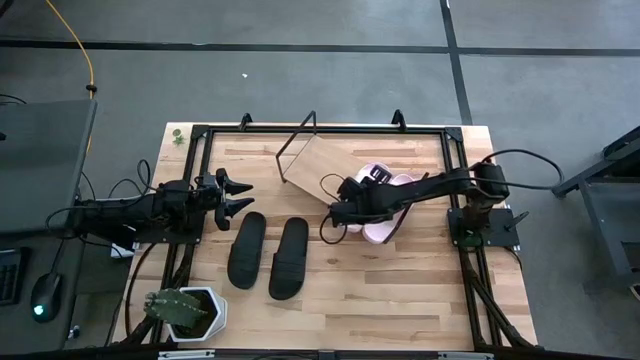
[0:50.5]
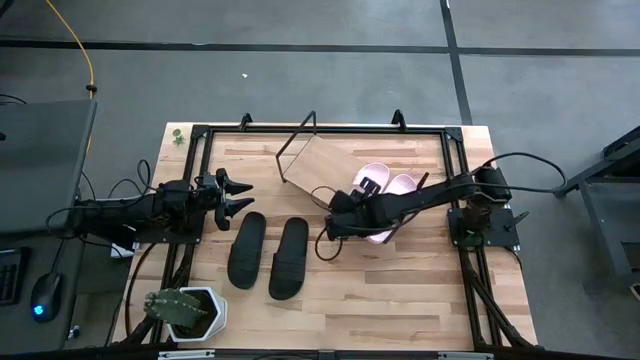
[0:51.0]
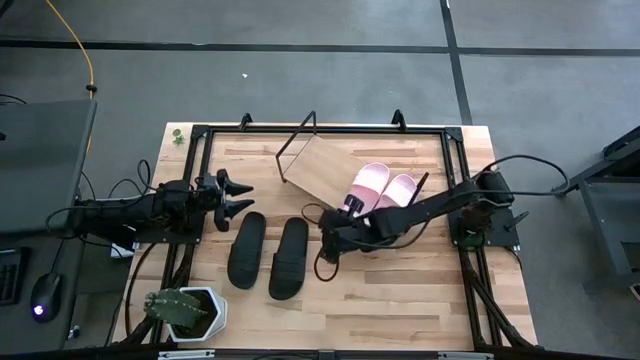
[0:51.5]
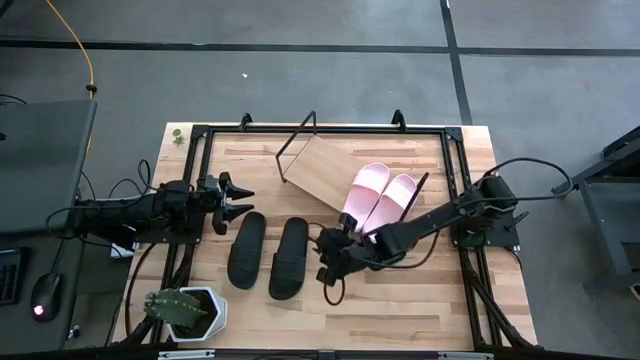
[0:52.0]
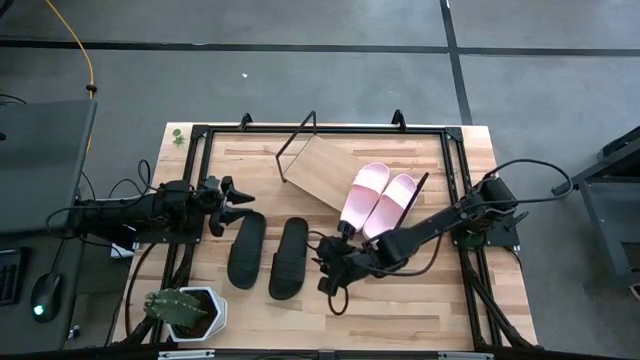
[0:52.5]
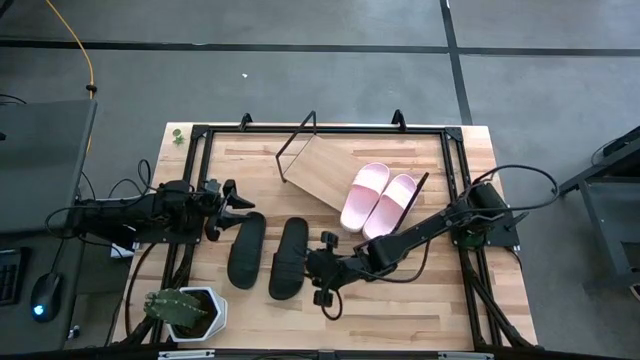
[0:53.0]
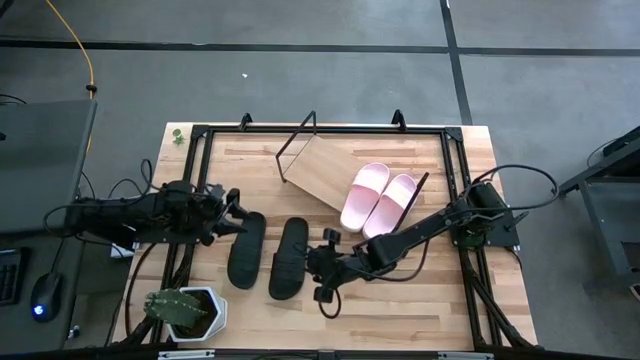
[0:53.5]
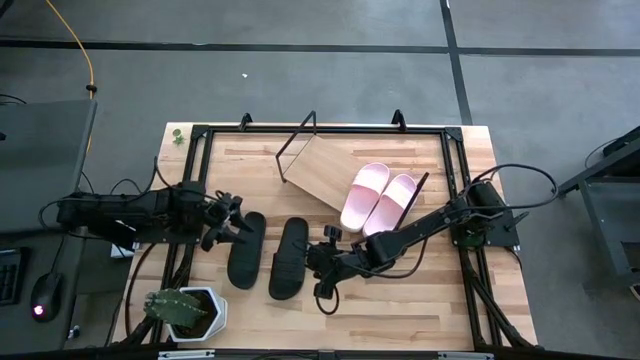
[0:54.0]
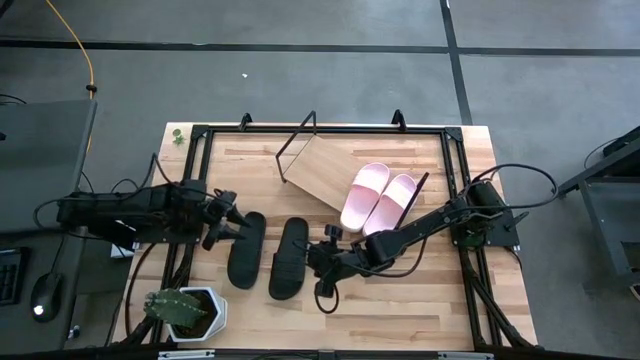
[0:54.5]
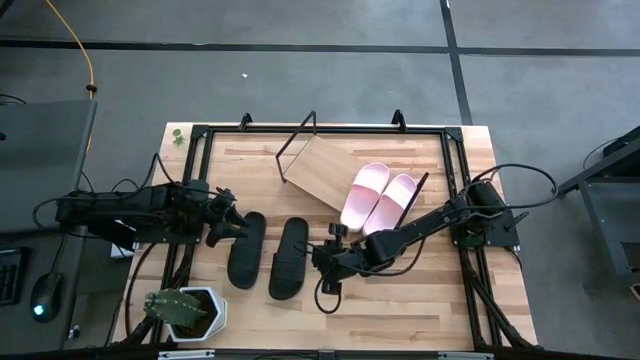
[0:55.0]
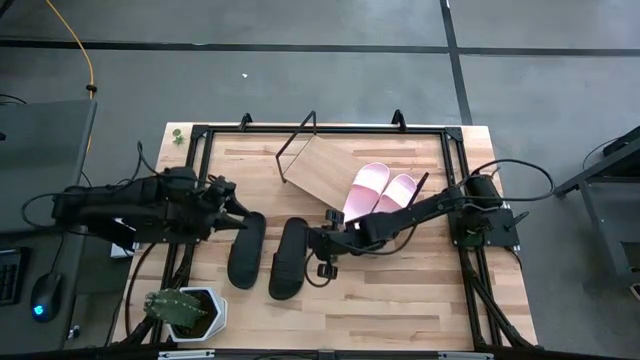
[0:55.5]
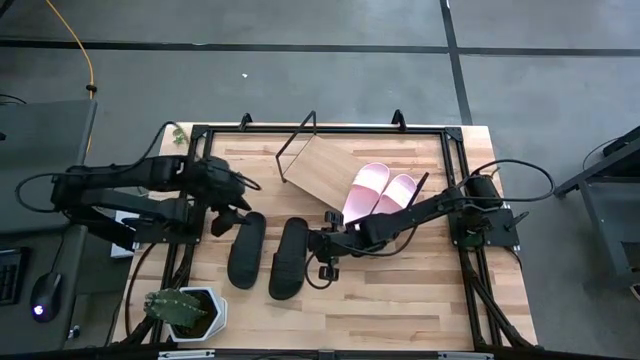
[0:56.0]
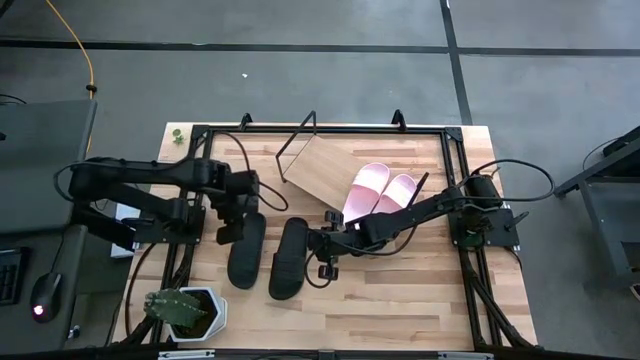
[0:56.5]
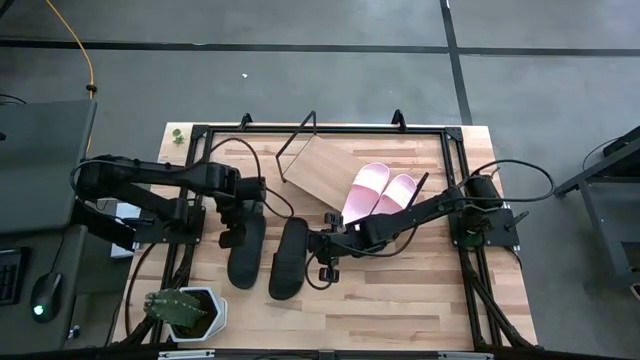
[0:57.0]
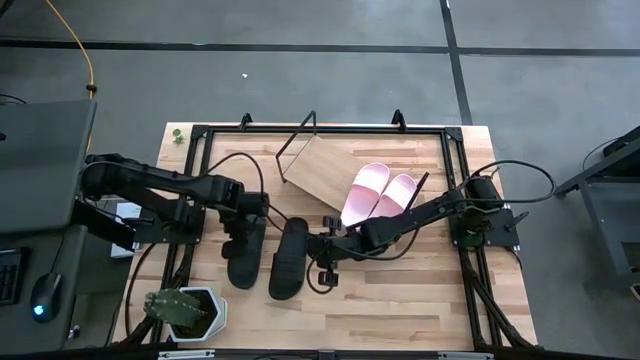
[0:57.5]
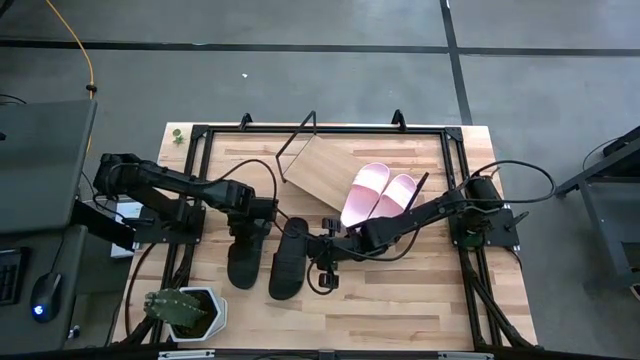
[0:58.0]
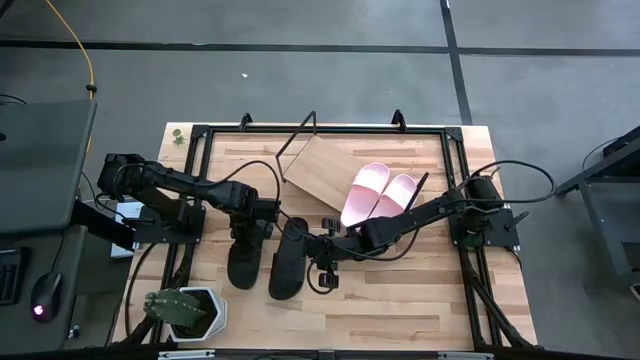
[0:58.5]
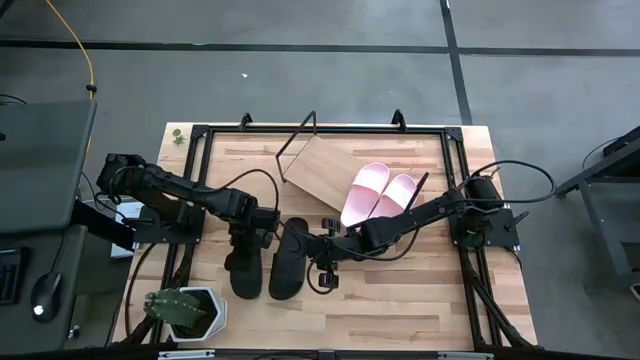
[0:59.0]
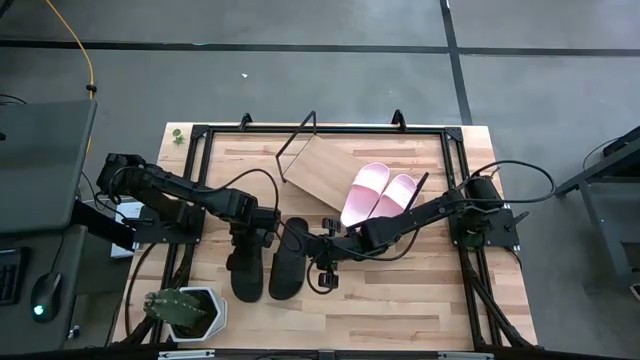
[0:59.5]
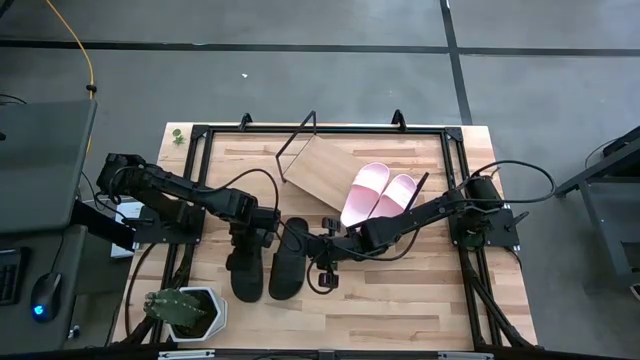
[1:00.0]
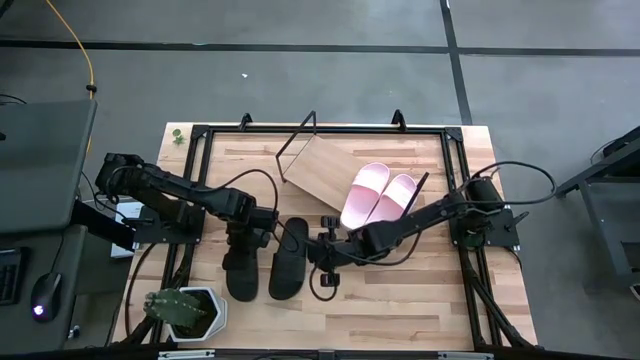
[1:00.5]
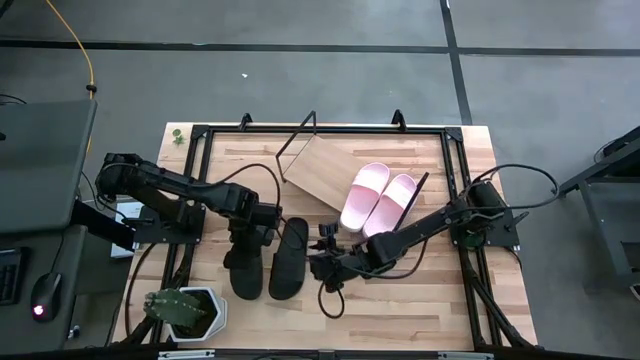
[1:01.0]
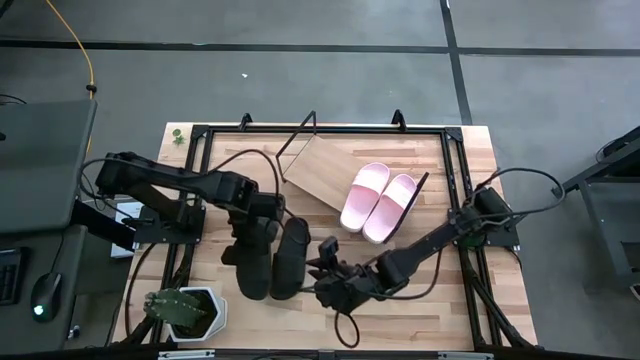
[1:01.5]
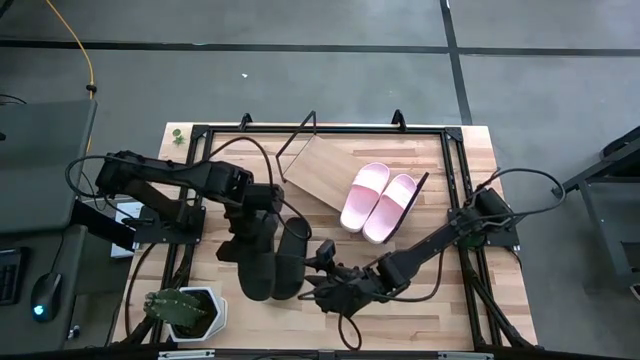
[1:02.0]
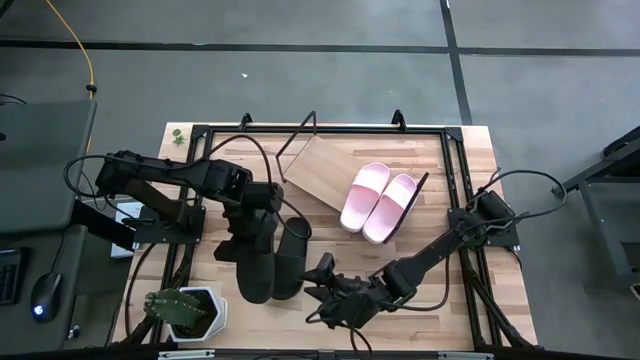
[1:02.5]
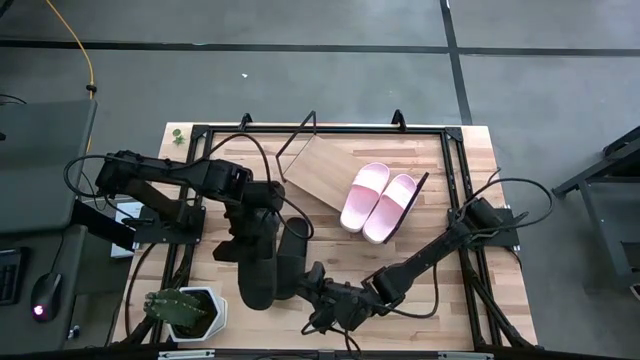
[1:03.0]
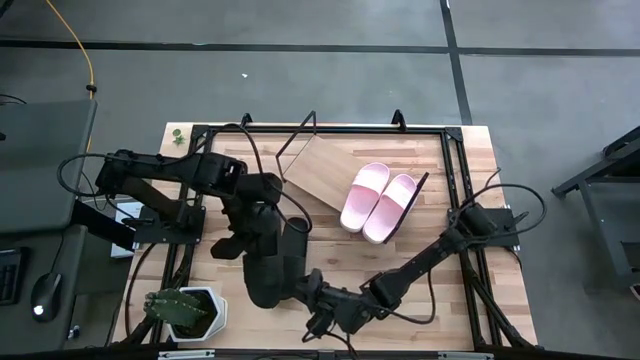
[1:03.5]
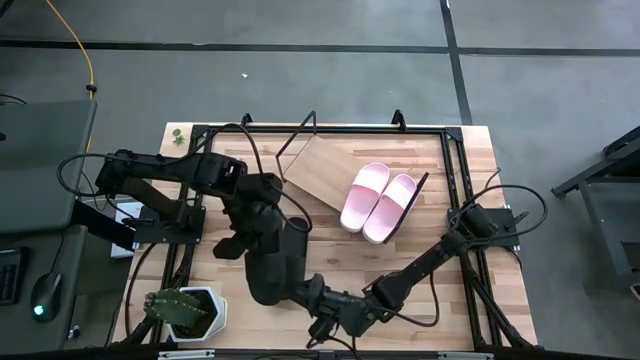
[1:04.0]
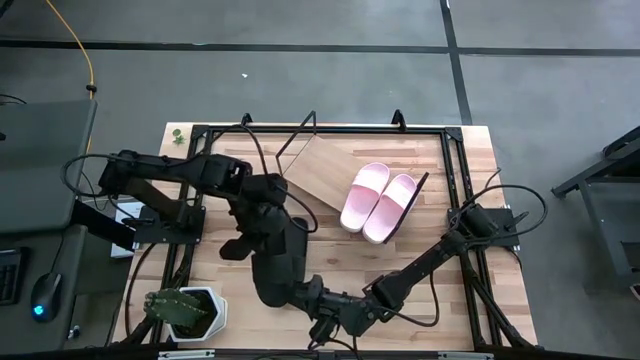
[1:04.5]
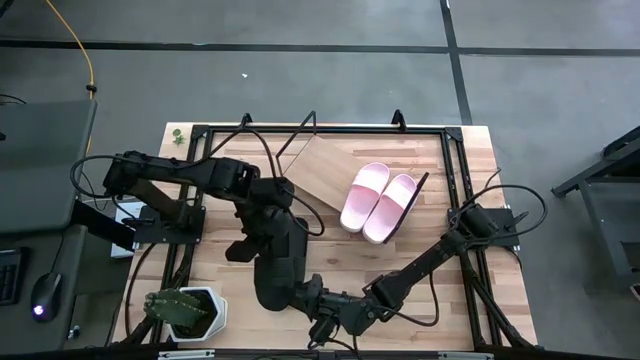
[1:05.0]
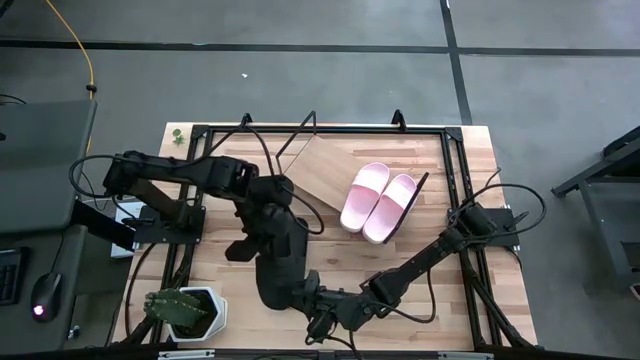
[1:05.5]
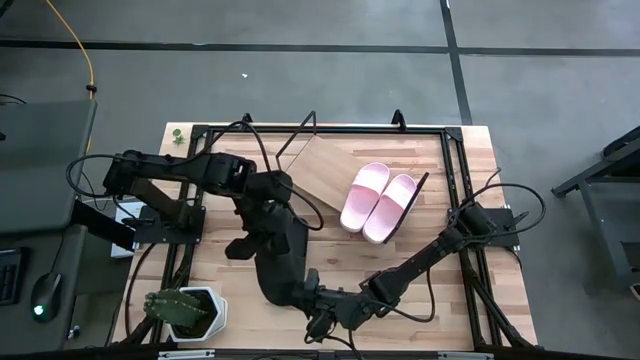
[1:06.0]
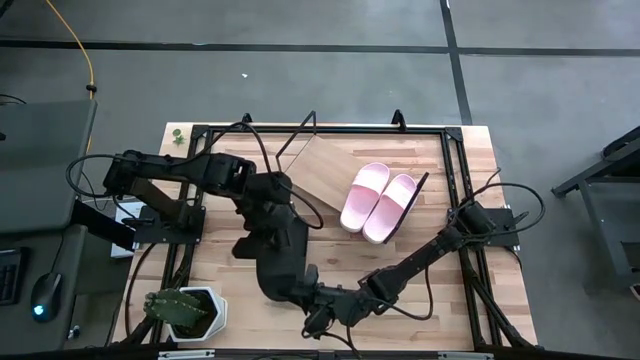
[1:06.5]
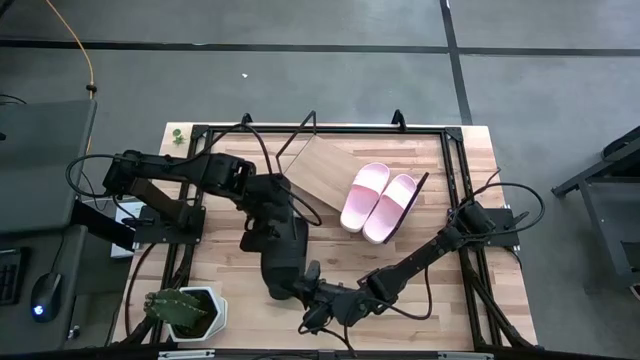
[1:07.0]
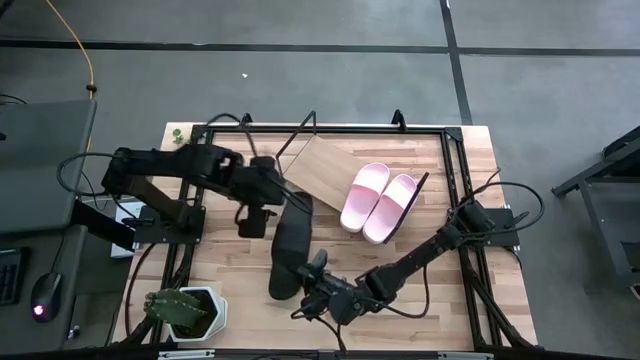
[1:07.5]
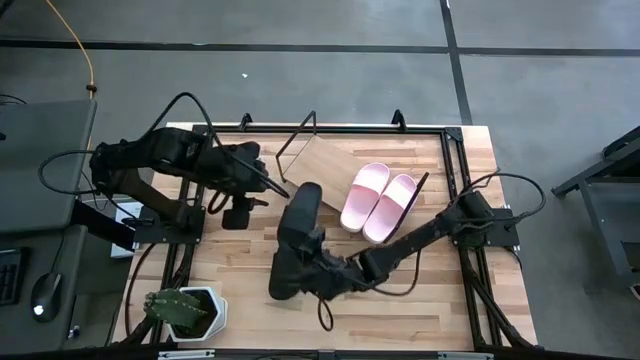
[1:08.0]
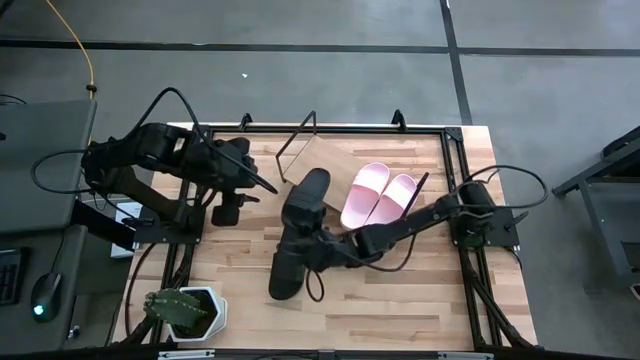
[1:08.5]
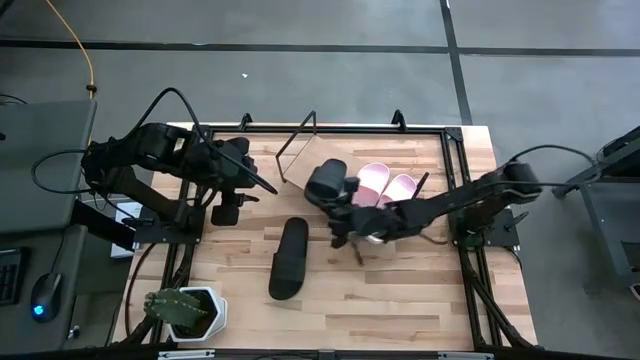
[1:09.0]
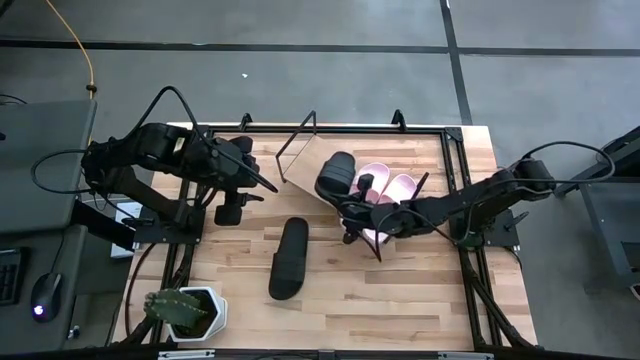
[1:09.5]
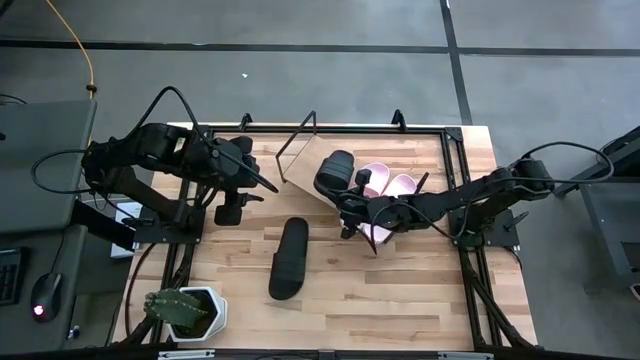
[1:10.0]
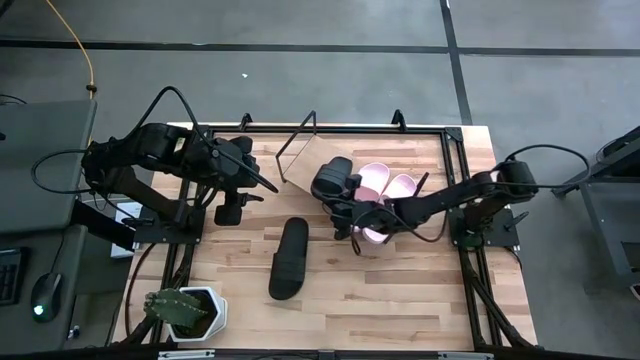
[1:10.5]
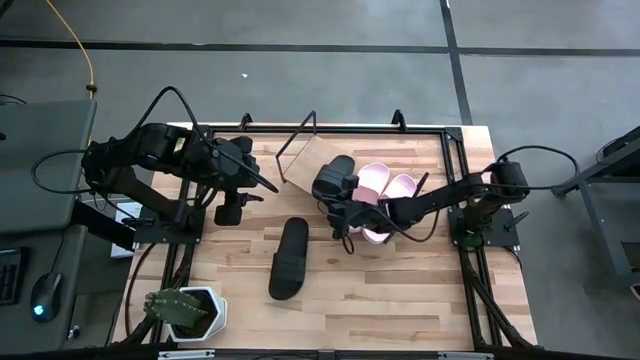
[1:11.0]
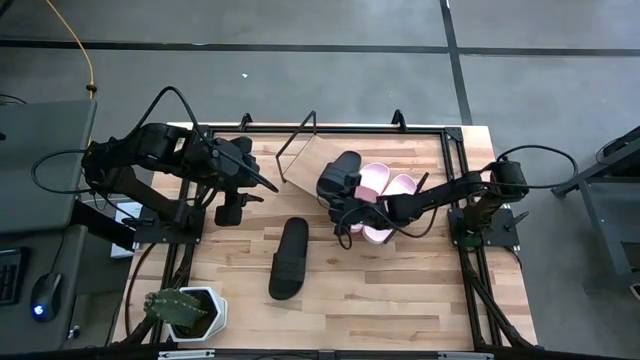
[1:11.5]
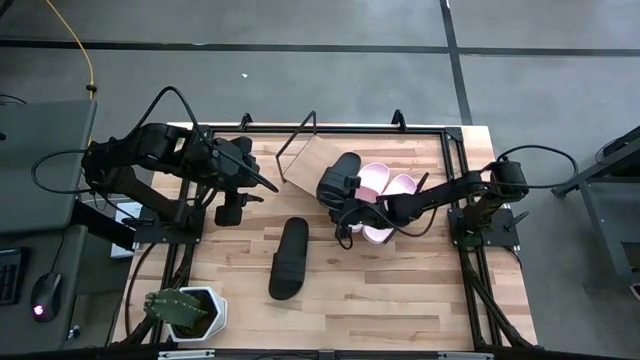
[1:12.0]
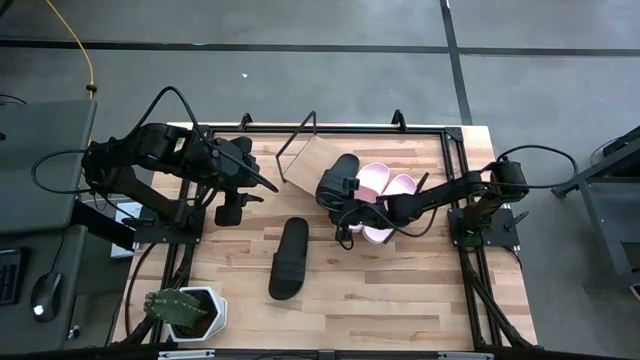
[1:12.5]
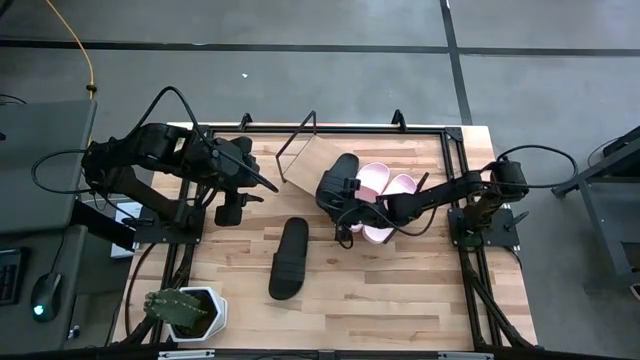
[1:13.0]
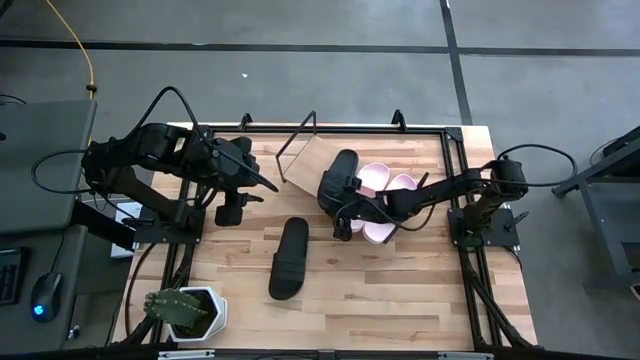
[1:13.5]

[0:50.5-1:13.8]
Task: Pick and place slides into the shelf
Put the left black slide on the shelf
